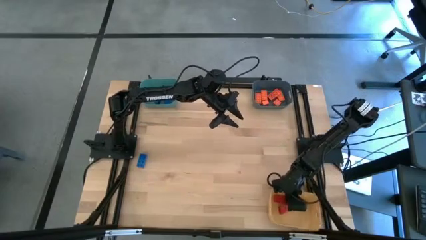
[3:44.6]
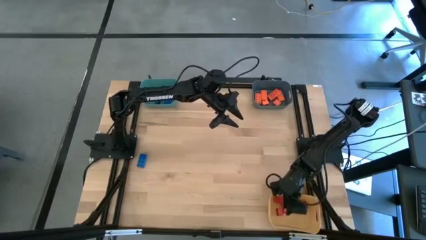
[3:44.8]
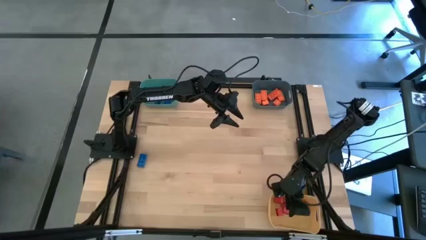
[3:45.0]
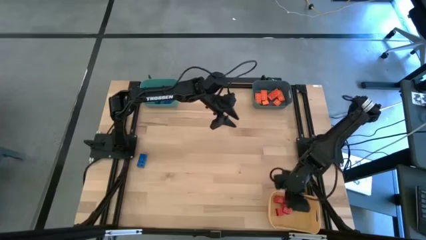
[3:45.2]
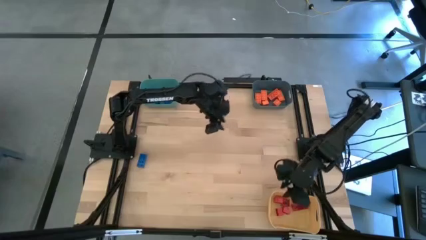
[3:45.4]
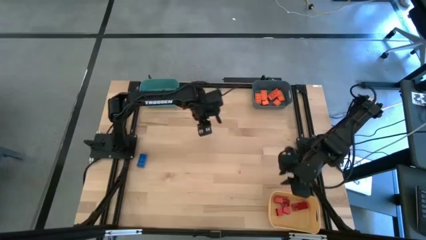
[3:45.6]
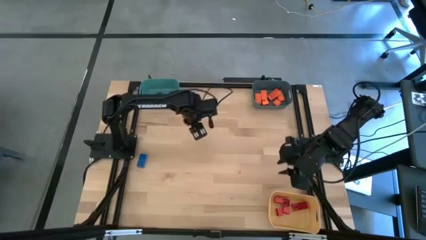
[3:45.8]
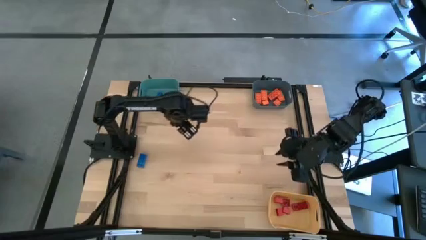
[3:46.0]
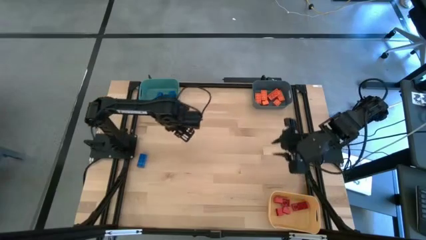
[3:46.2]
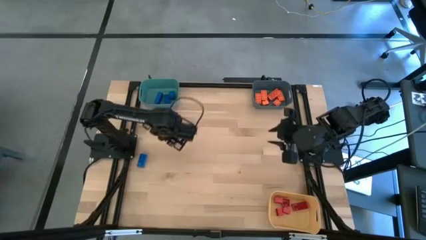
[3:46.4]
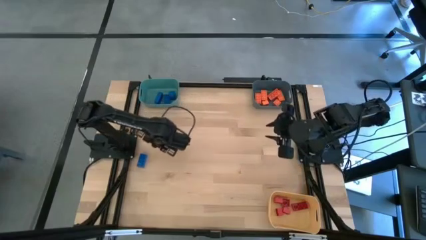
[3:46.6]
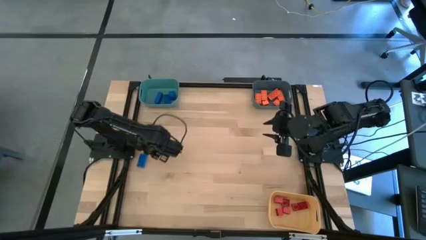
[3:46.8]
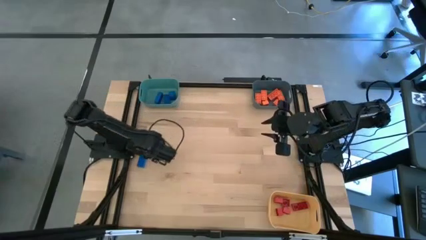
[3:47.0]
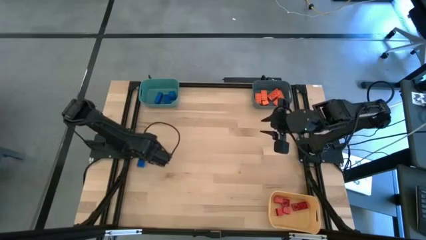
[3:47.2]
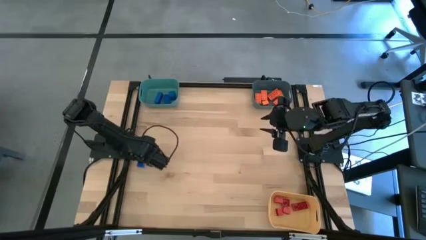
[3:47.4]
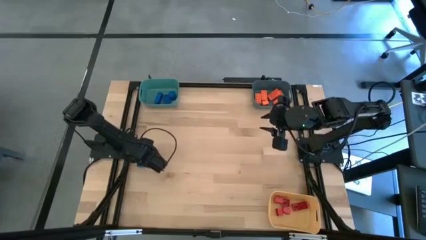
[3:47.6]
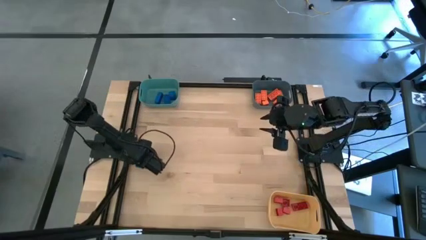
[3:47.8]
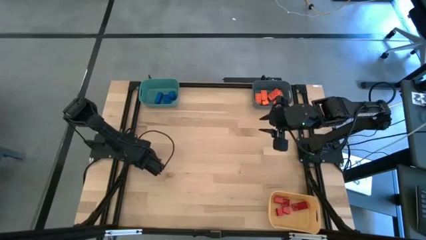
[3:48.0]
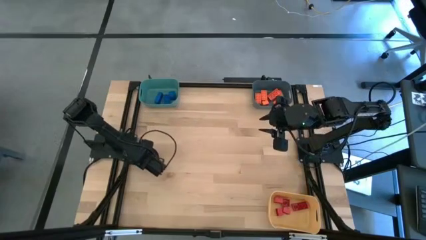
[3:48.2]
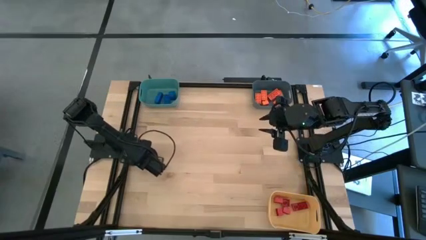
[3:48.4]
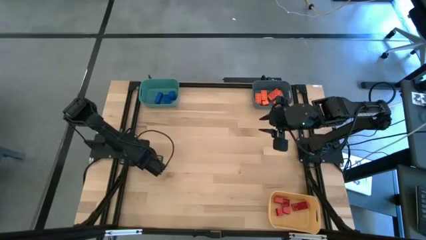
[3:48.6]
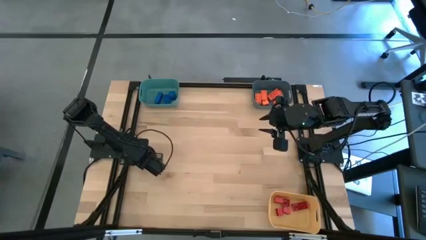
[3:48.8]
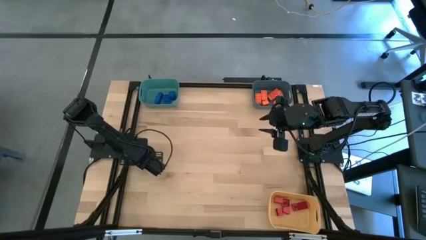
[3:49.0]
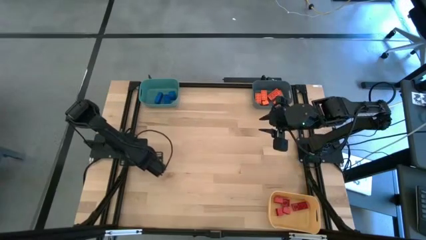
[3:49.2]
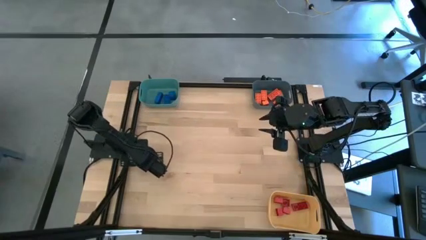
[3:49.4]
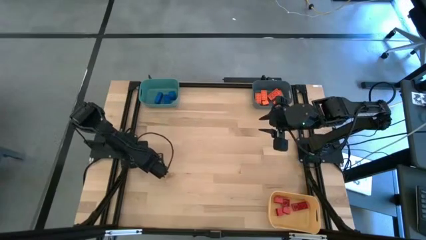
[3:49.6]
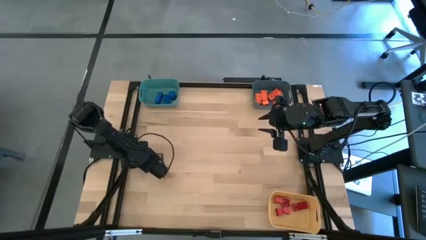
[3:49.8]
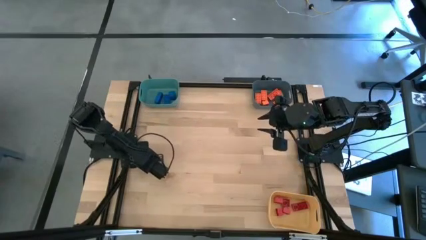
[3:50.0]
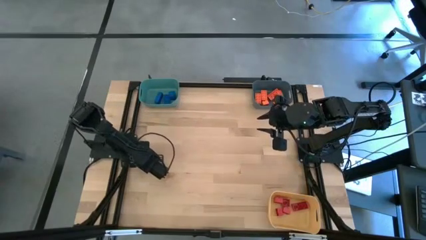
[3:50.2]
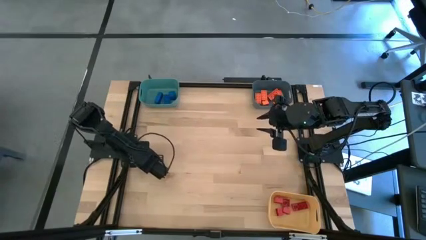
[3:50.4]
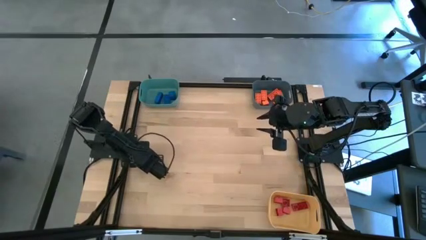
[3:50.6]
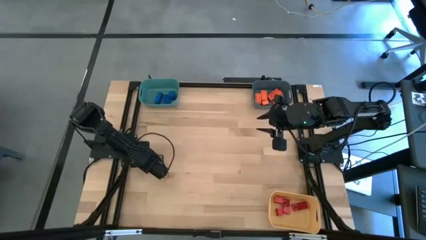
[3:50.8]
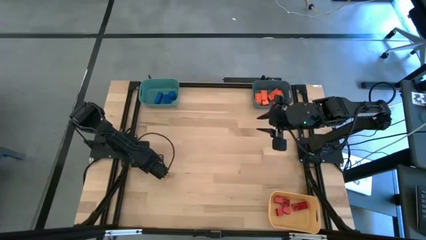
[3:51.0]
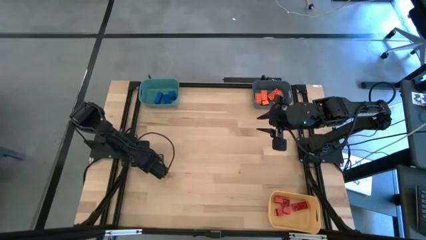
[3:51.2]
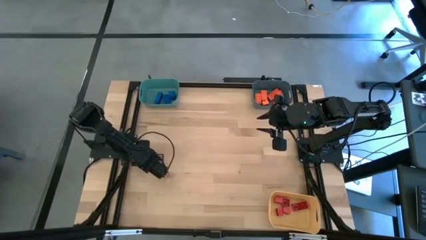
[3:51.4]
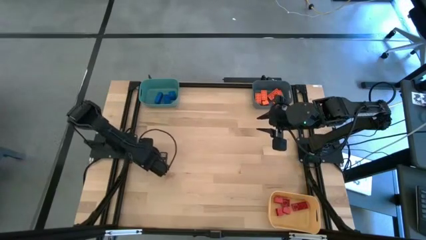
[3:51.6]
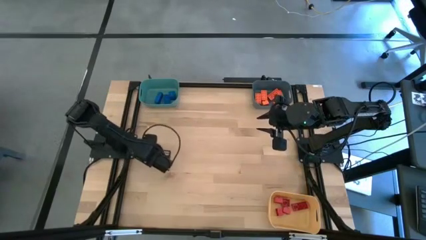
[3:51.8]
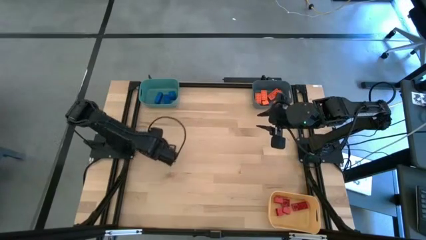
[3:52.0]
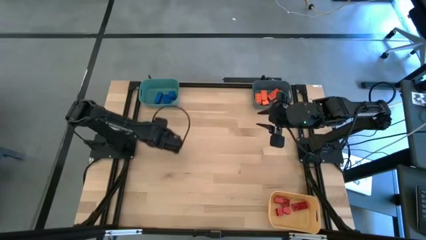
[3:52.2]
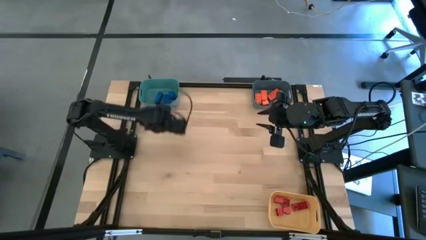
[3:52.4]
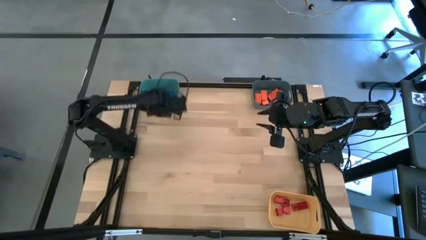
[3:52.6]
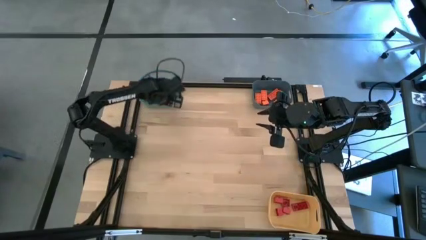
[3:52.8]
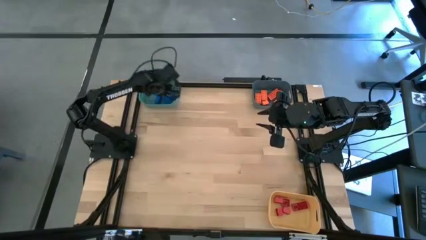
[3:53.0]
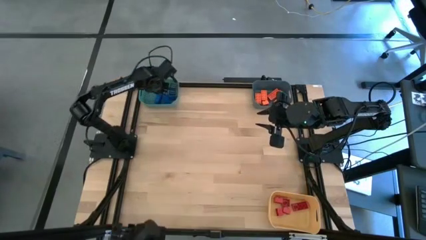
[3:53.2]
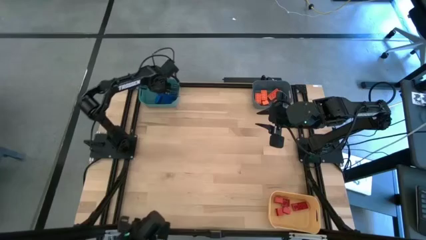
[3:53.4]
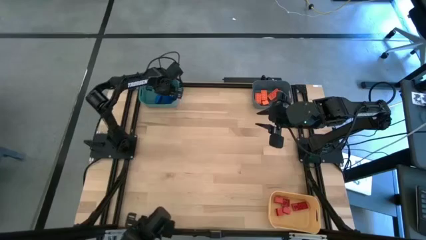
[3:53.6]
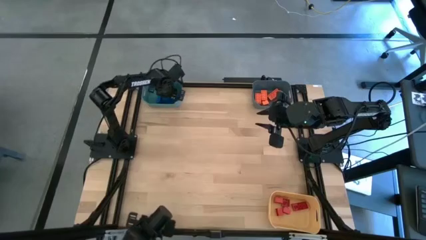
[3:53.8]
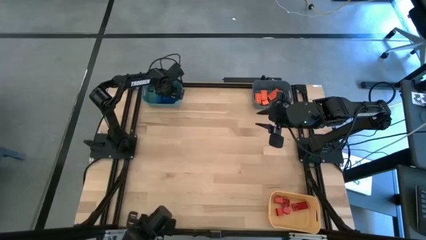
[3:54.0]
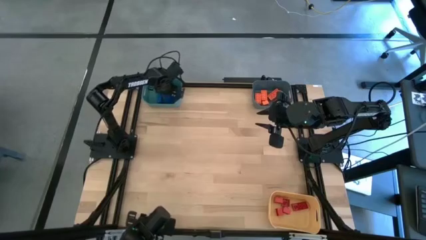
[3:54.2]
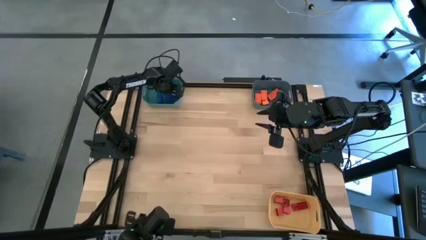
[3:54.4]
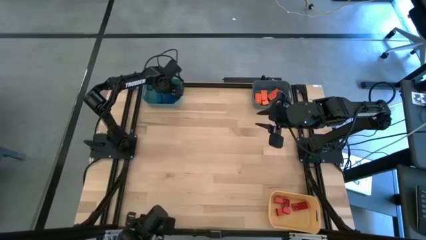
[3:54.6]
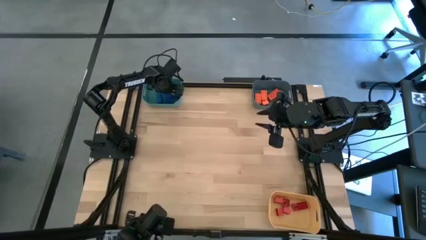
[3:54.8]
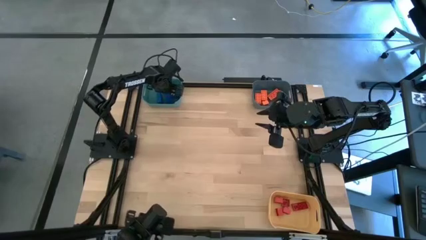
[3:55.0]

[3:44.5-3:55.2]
Task: Sort & place blocks by color
Put the blue game piece into the blue bin

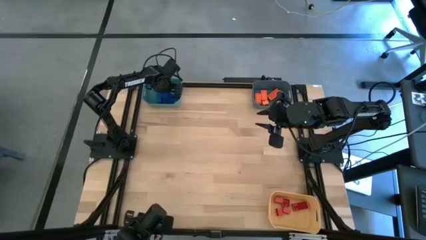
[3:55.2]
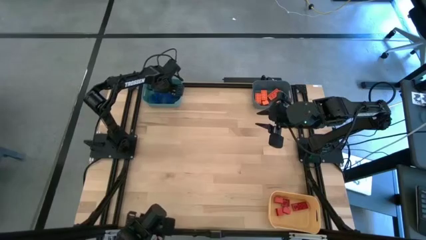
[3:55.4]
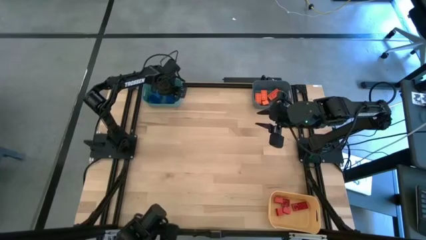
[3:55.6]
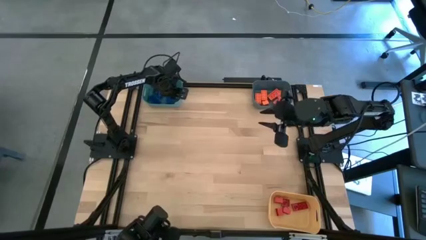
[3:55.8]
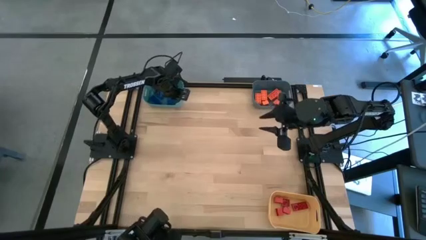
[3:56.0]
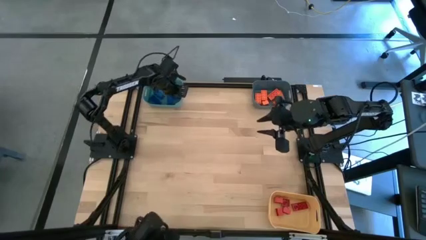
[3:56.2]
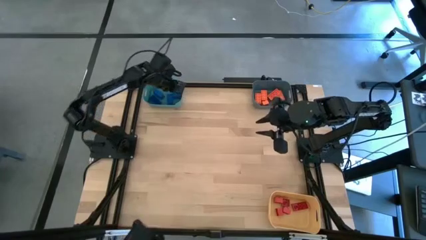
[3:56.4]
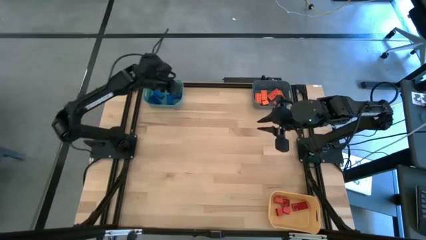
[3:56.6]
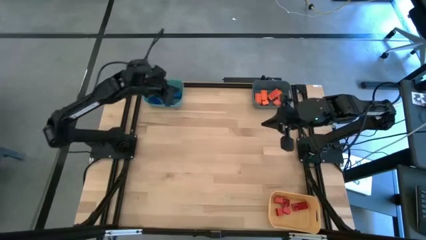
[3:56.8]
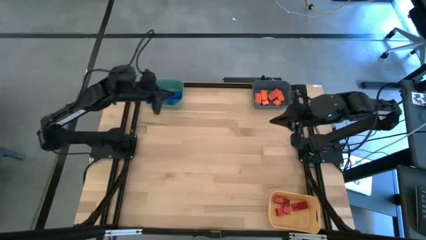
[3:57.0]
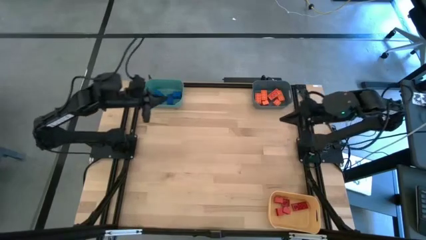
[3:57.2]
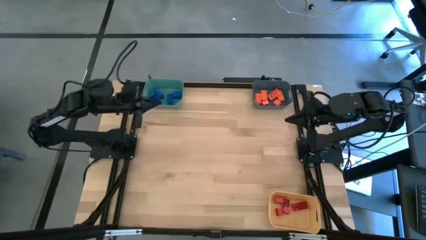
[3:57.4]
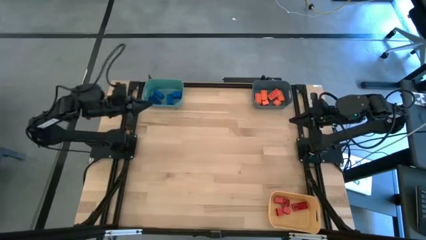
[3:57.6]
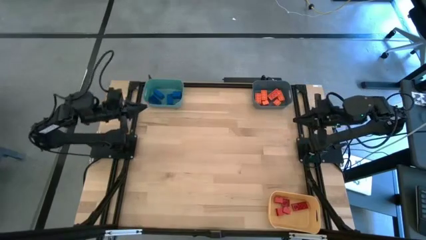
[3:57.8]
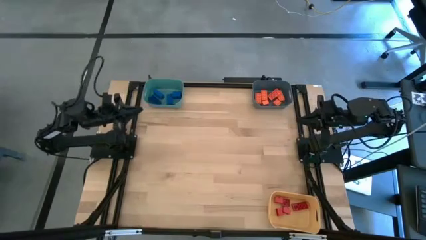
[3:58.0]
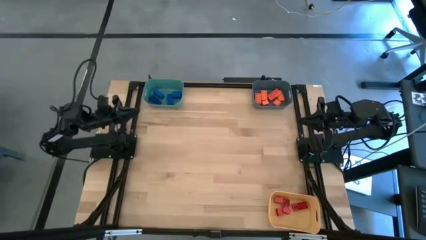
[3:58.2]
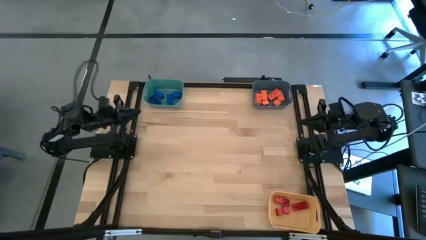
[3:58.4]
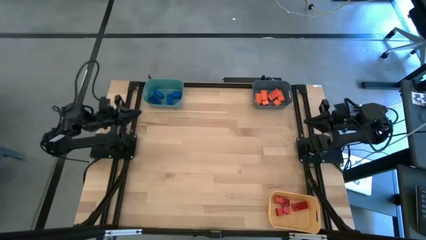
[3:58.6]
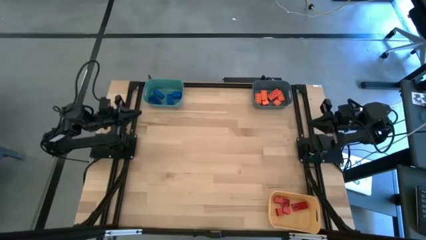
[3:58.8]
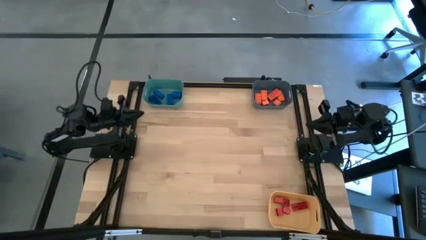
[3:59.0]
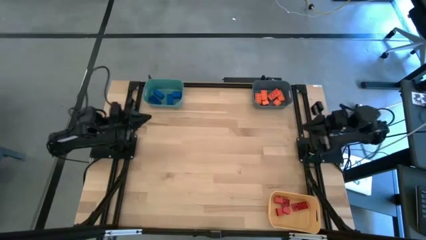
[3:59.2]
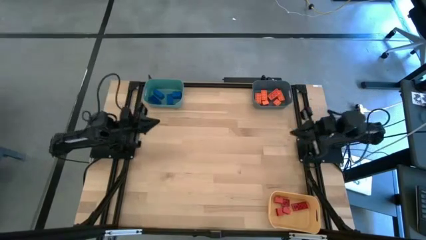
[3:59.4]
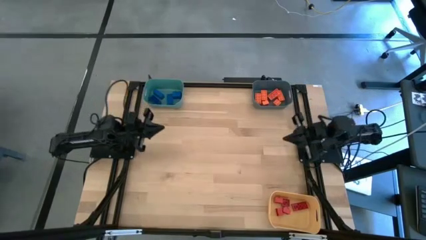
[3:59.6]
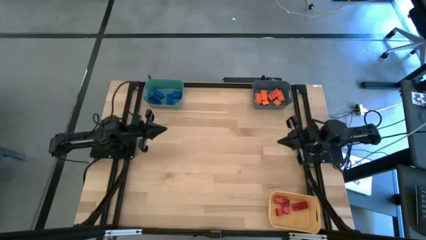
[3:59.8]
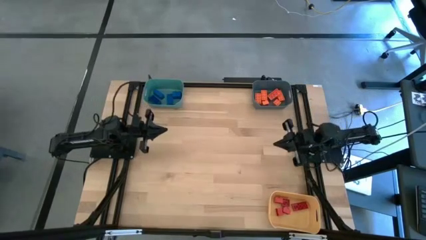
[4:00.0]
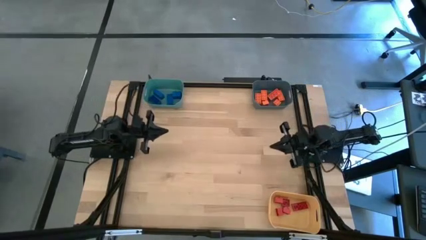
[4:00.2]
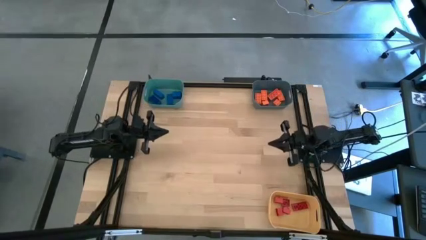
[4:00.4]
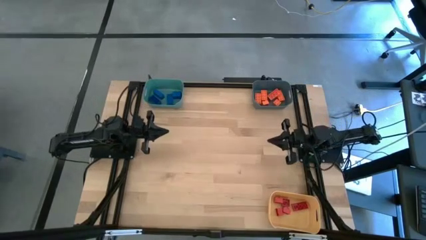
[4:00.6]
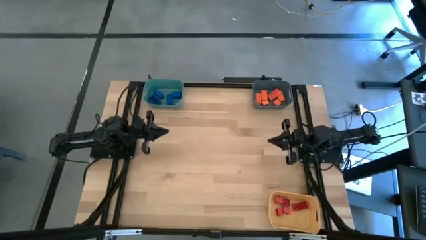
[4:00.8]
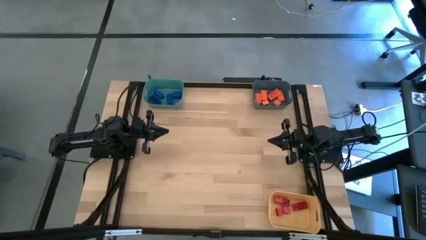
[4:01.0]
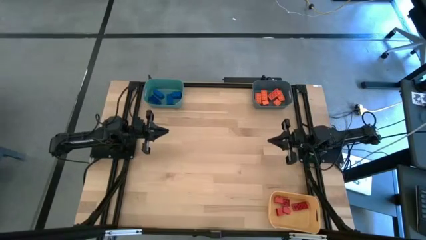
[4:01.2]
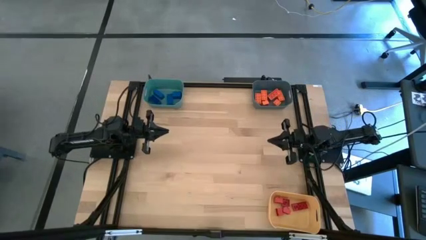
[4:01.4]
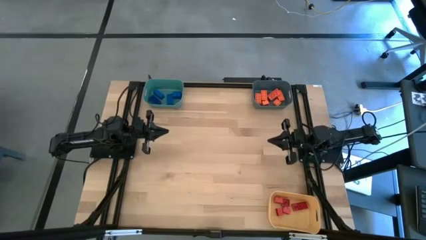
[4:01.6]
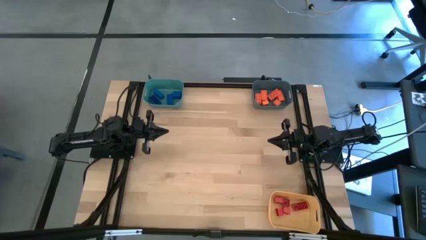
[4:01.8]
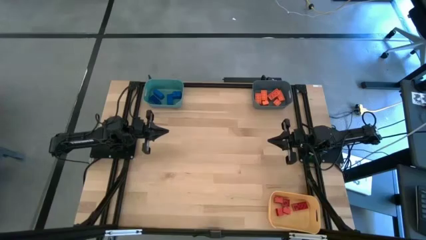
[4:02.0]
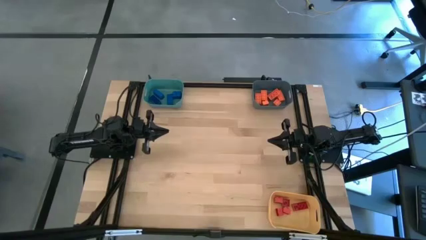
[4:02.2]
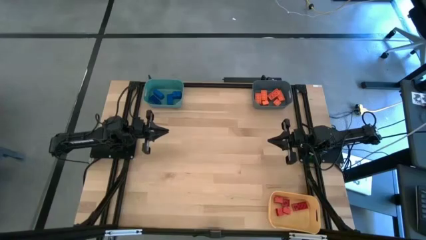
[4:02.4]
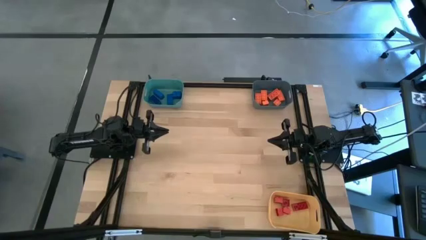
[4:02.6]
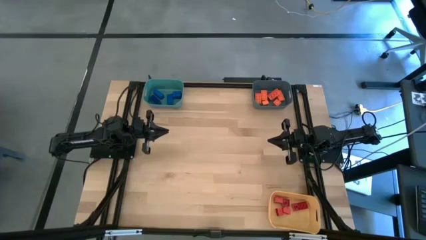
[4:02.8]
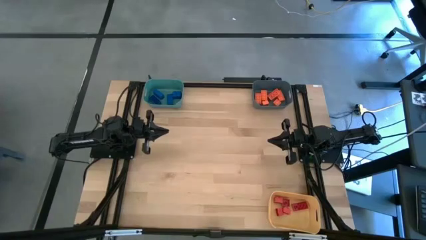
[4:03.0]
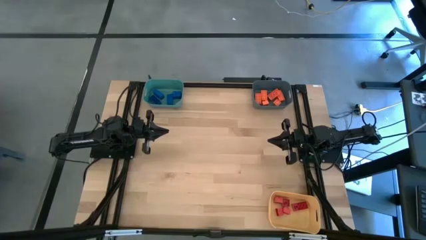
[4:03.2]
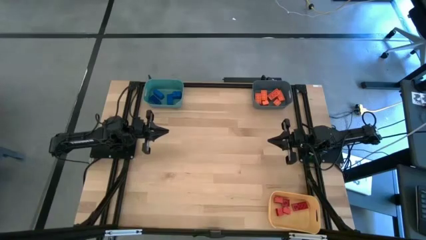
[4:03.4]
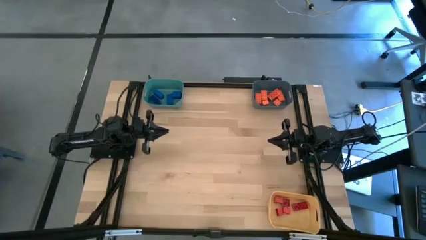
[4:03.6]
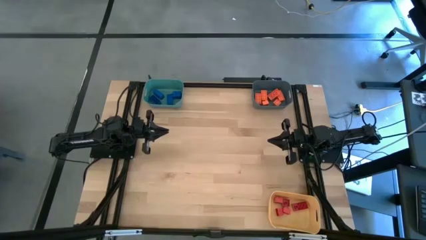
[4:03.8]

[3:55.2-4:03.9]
Return to Home Position
